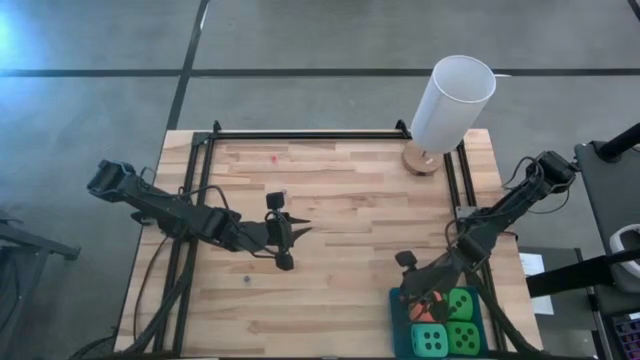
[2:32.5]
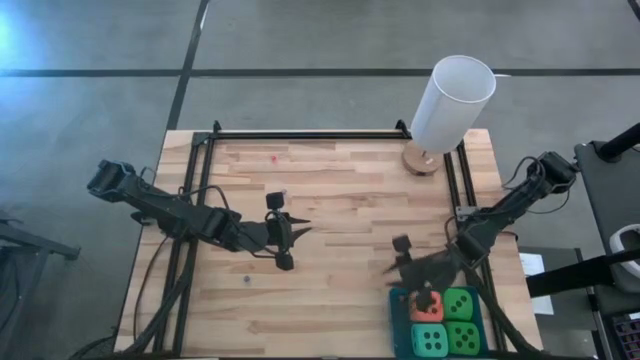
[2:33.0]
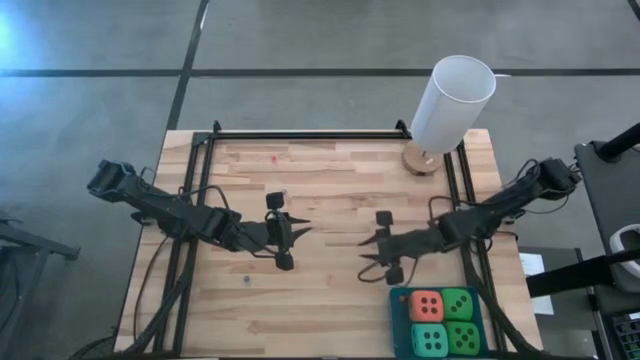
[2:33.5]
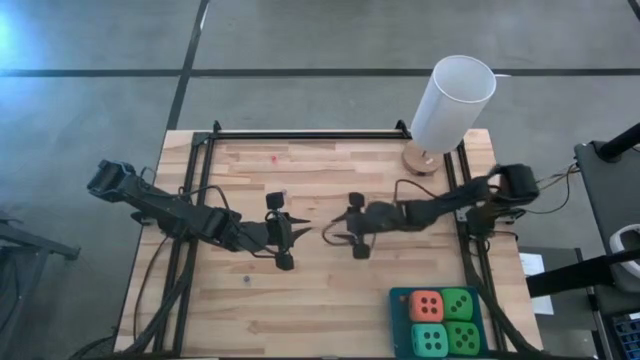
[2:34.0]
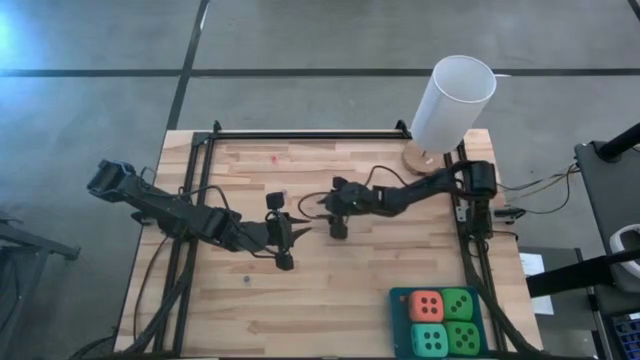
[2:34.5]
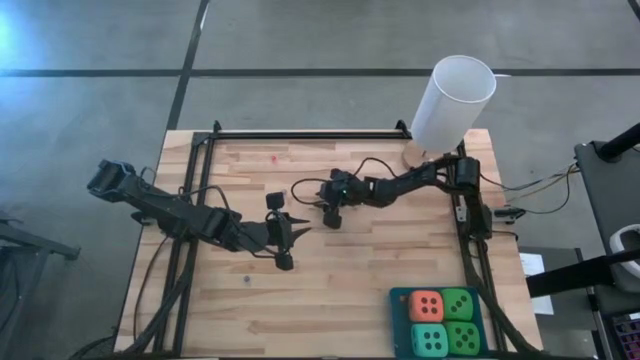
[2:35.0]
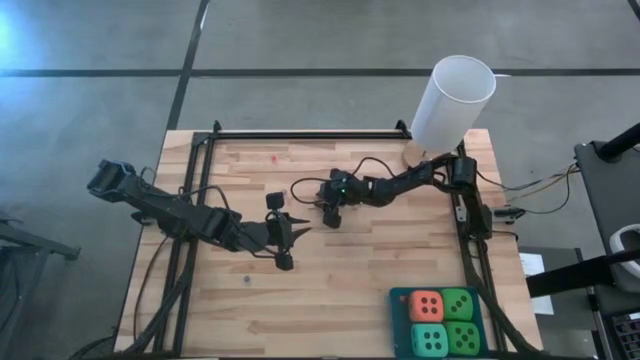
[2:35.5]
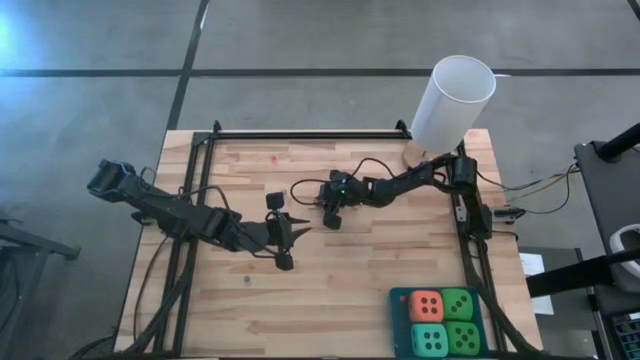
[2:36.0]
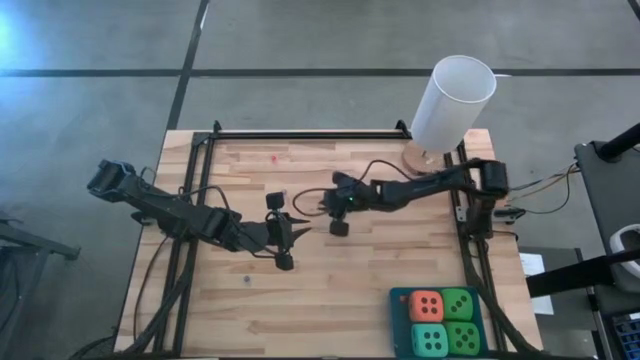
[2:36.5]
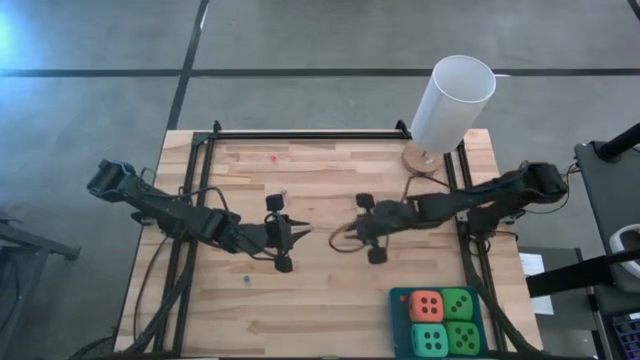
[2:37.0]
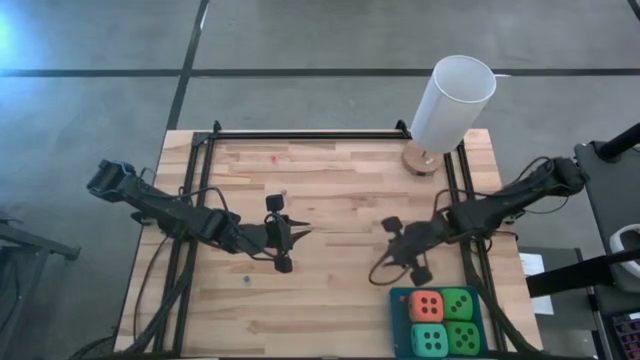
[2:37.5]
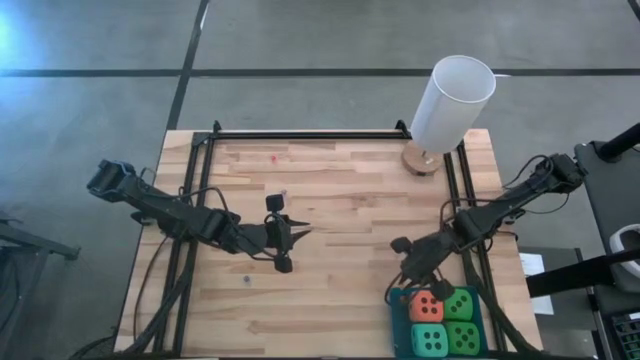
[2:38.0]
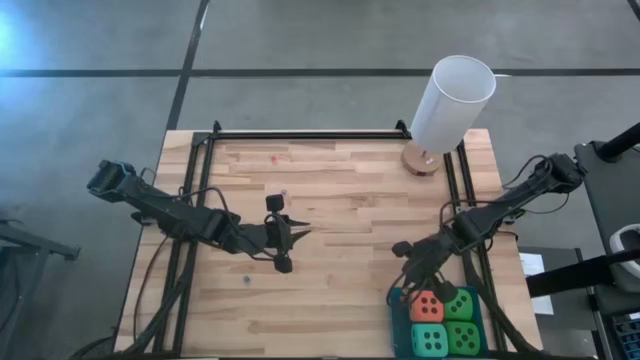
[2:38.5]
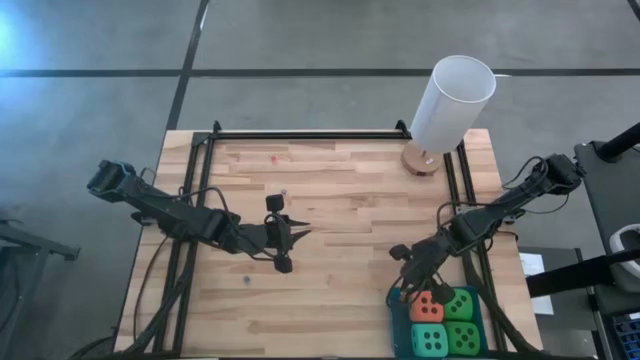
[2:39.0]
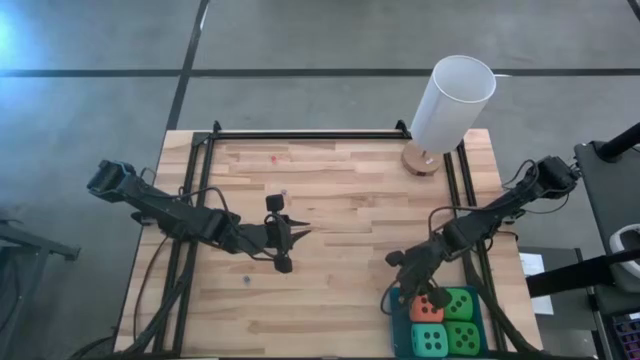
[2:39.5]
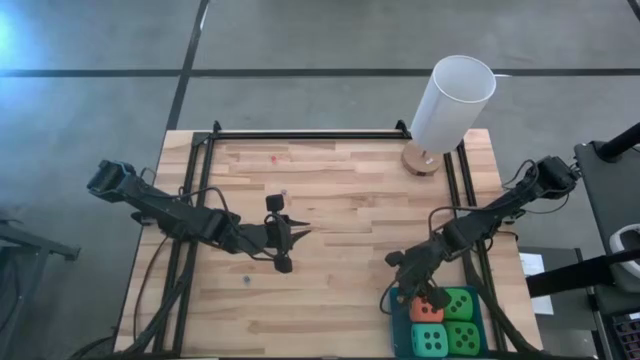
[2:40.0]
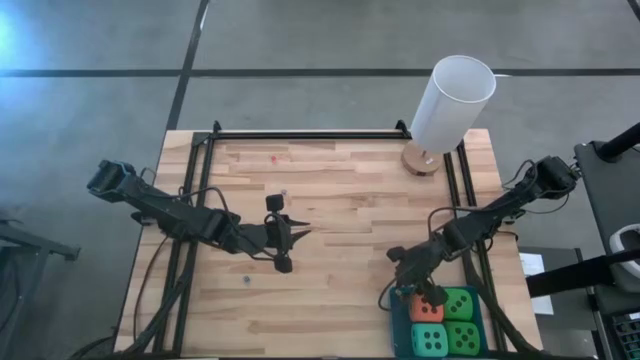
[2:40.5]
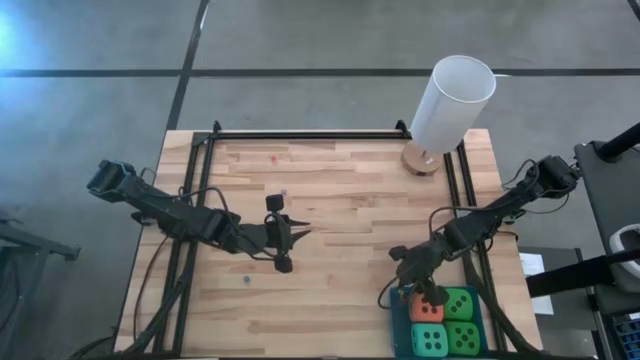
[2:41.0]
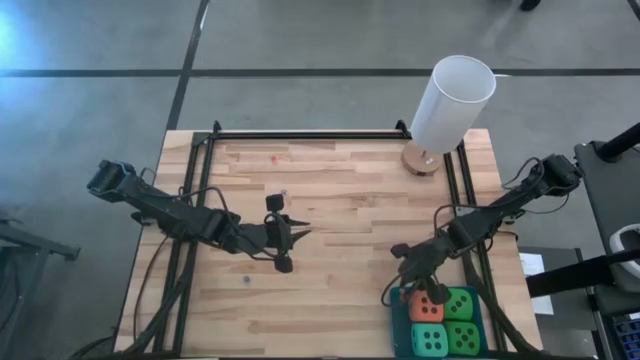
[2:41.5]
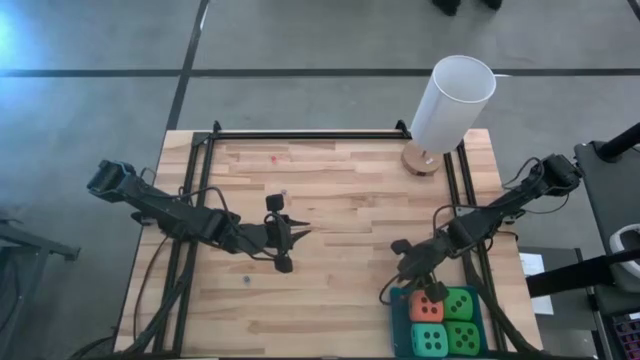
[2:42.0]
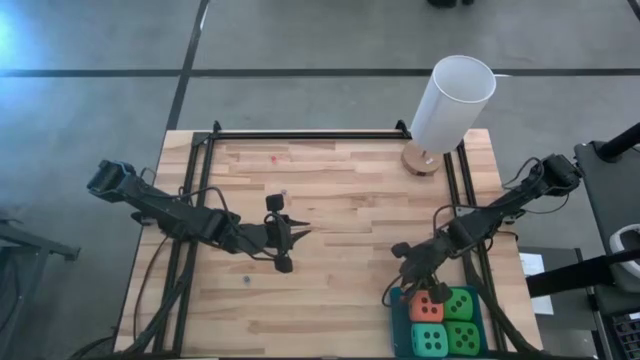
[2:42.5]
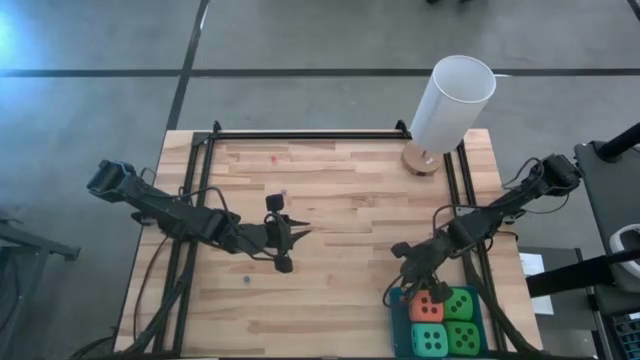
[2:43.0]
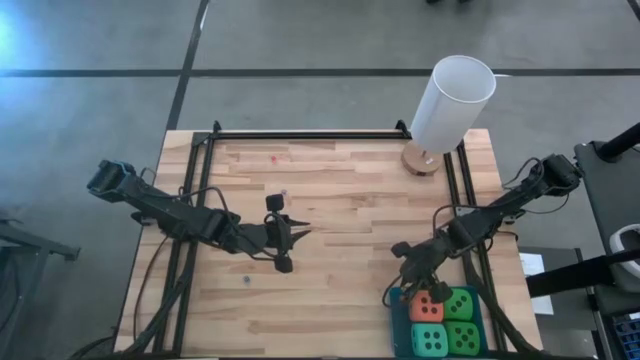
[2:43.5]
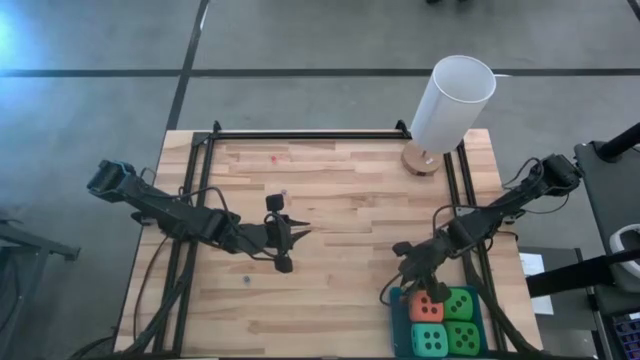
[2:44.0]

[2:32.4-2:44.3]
Task: Pick & Place Dice
Put the small yellow die into the blue bin

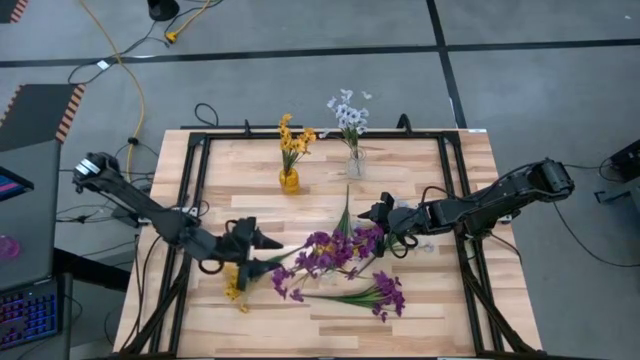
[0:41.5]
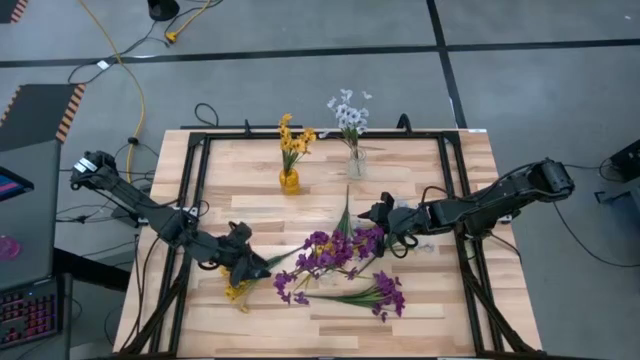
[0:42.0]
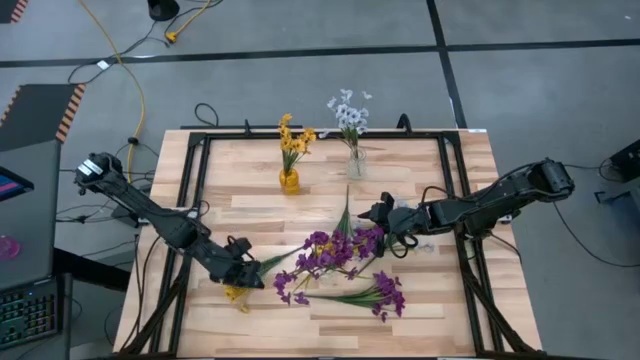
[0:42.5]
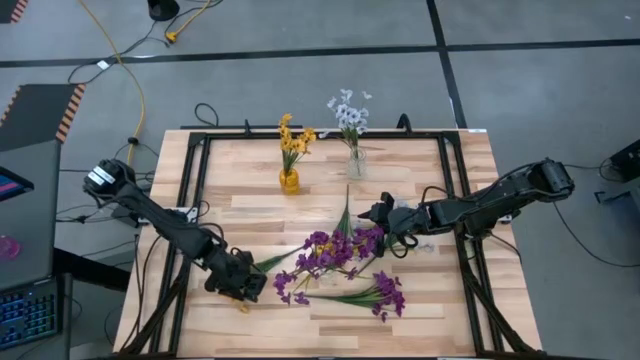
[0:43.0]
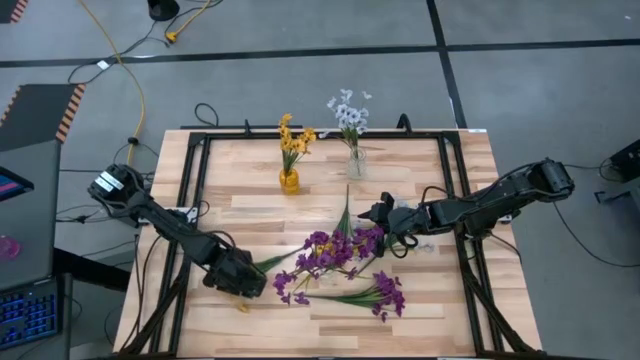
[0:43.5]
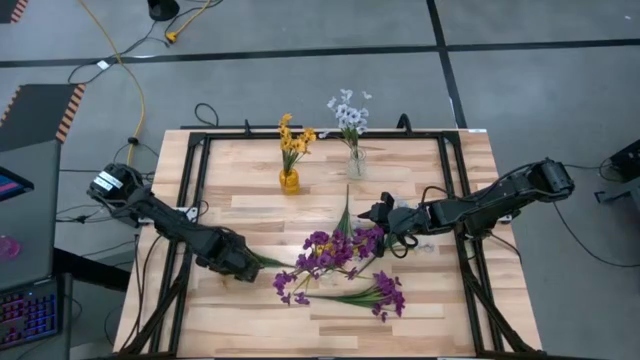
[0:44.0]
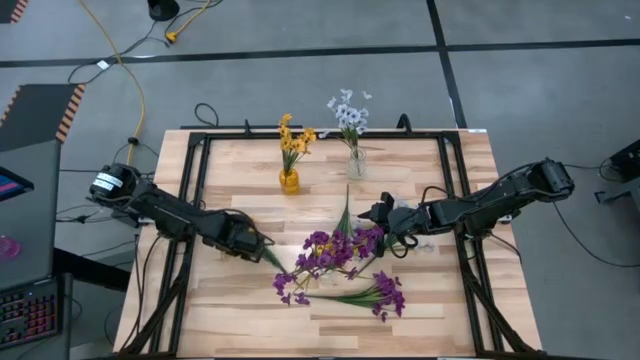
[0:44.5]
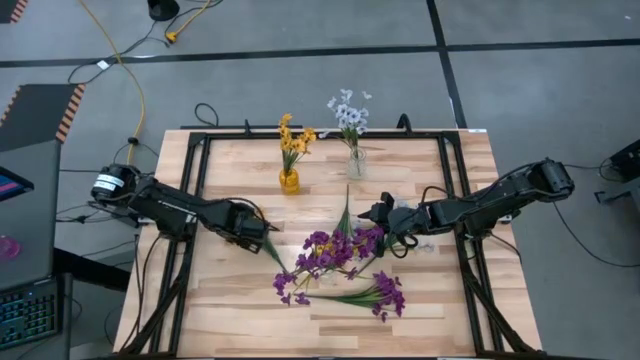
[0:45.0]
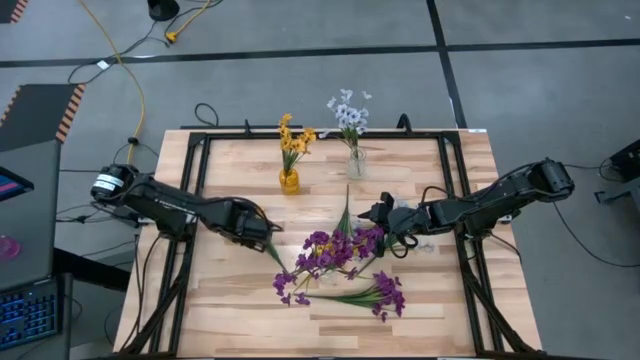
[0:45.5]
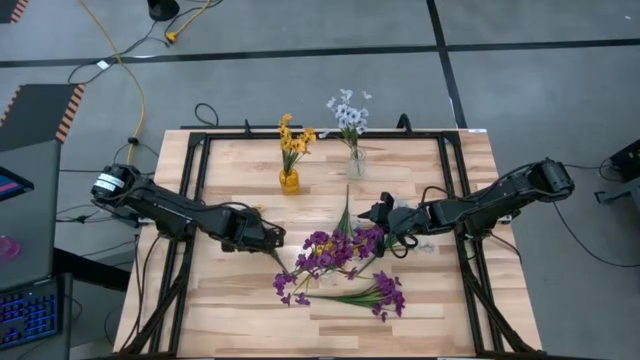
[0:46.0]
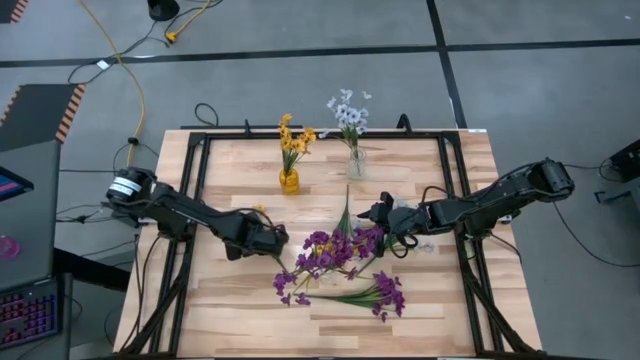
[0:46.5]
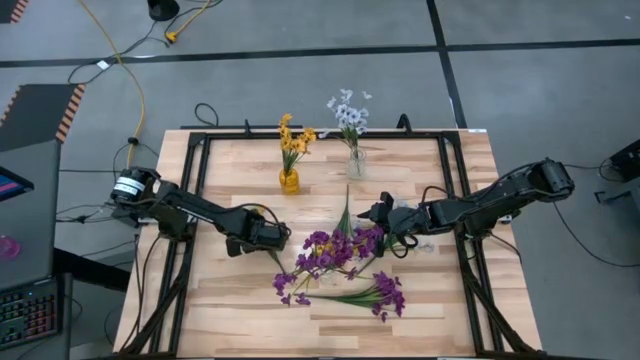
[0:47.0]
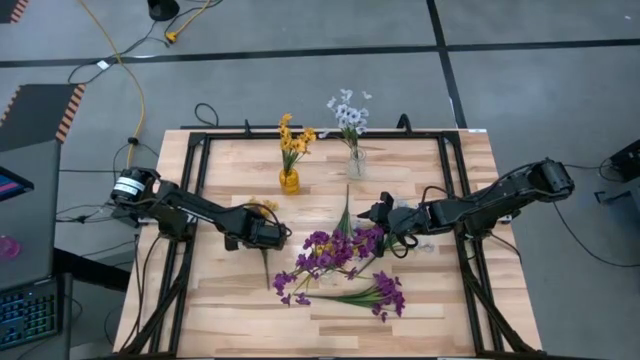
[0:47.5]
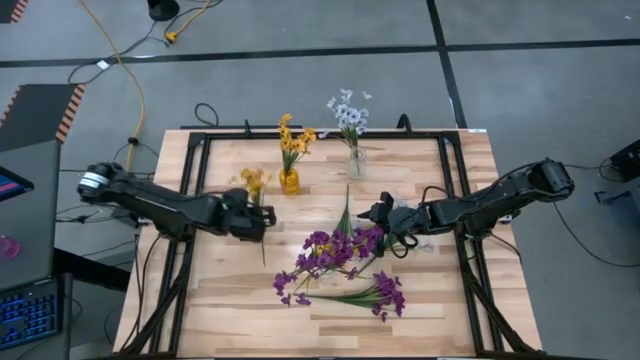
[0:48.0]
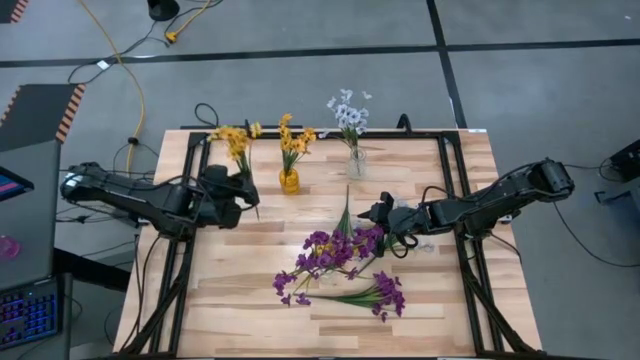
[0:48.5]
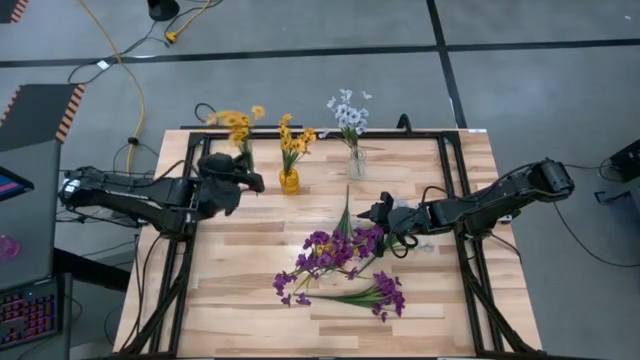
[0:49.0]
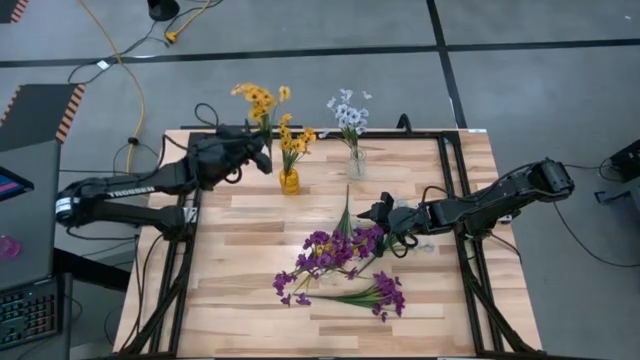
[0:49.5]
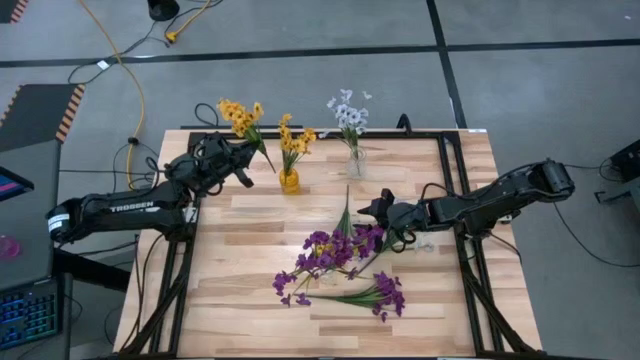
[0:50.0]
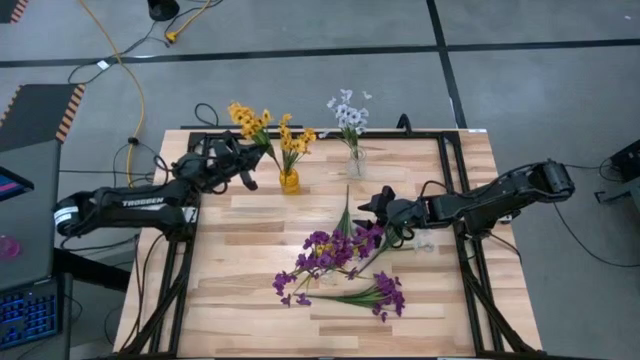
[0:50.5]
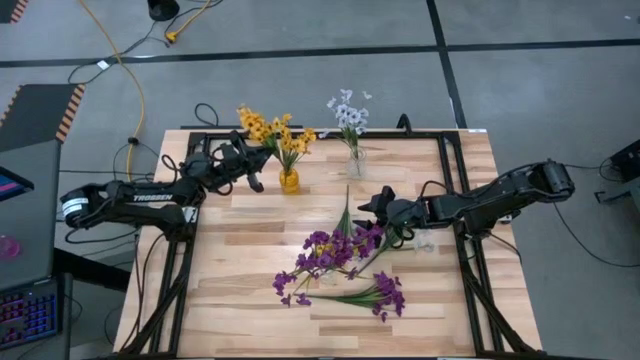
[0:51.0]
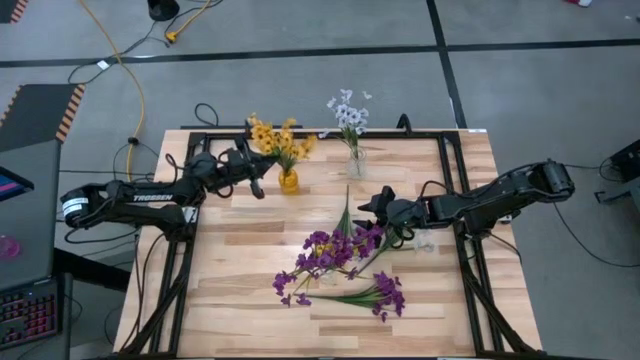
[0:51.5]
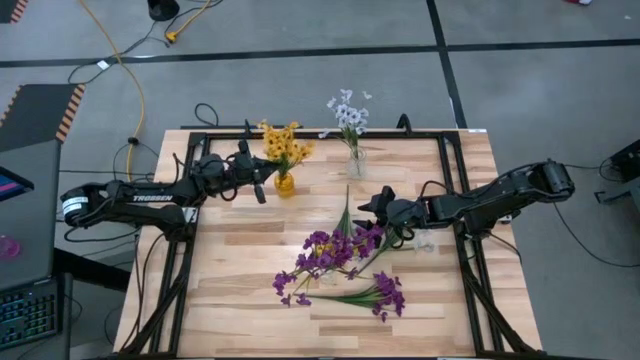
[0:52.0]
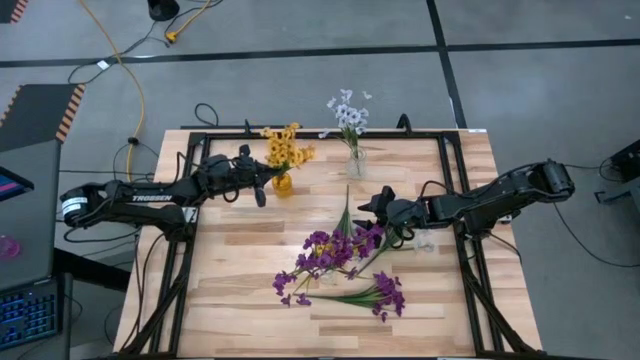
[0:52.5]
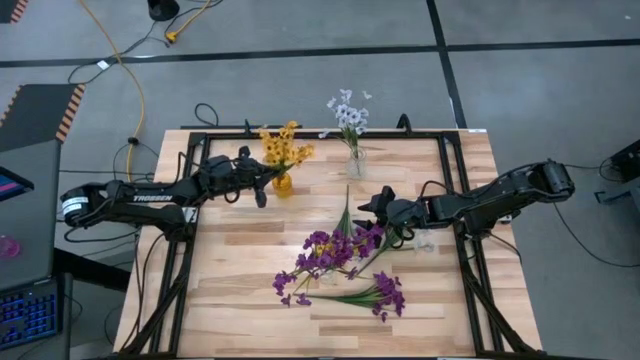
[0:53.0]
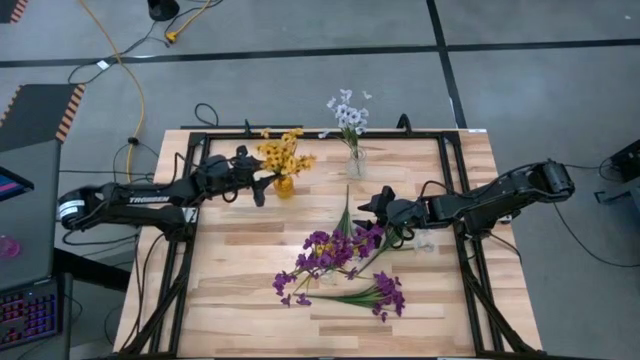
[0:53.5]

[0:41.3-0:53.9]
Task: Sort flowers into vase by color
Put the left yellow flowers into the yellow vase
